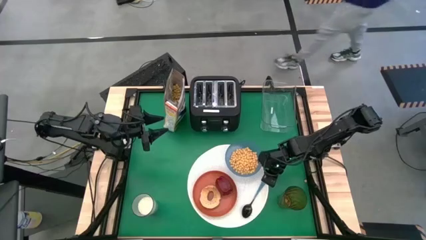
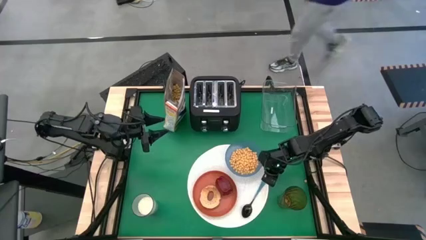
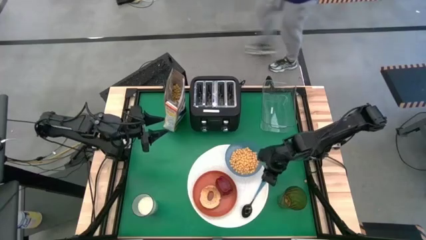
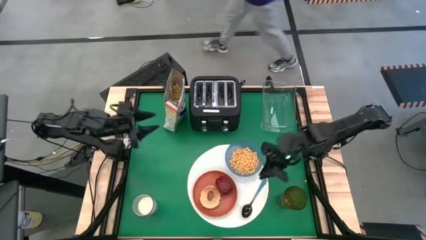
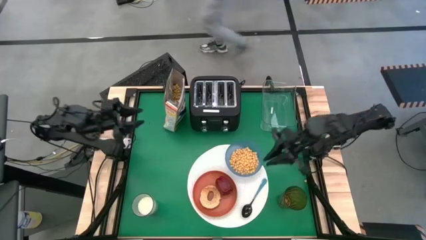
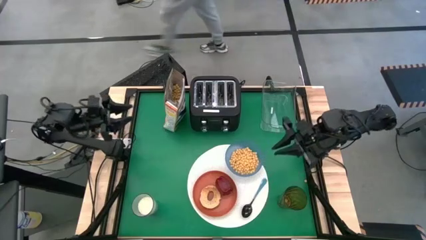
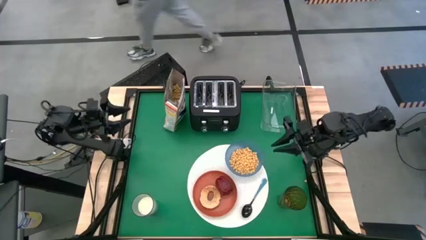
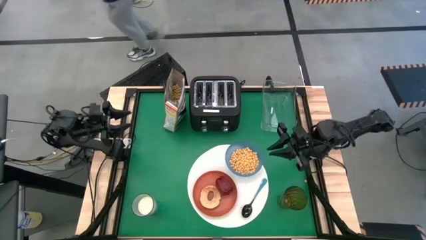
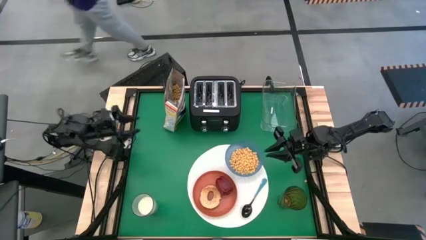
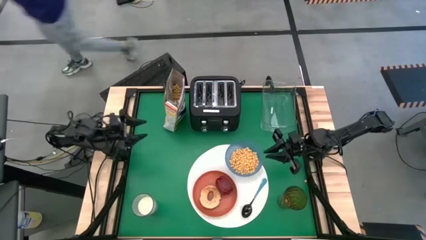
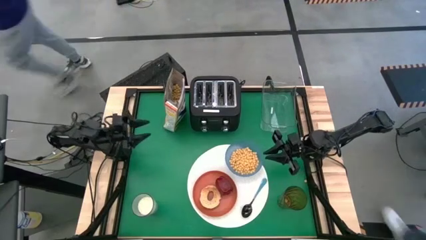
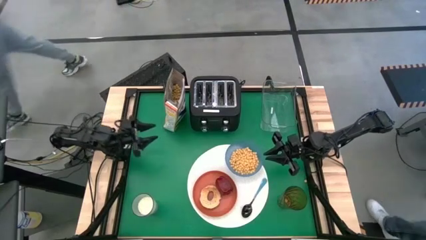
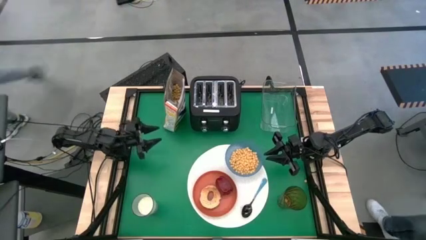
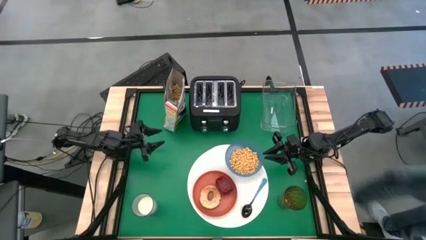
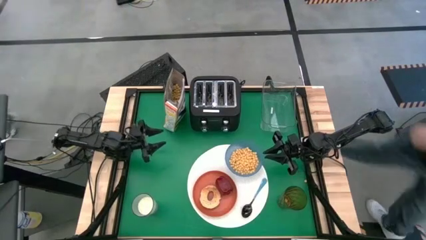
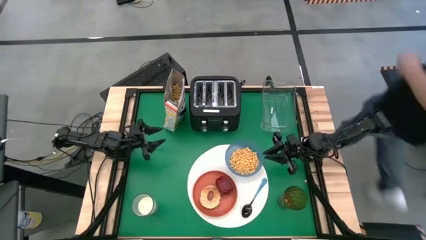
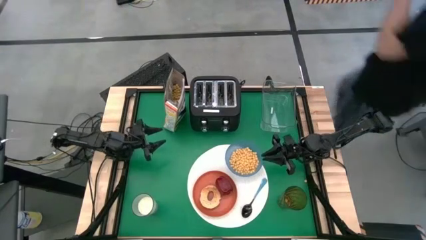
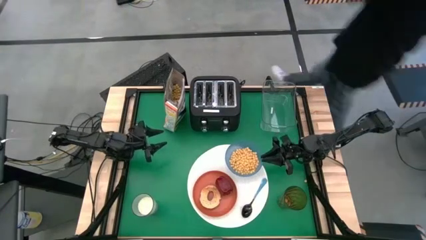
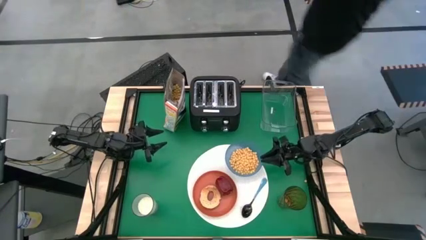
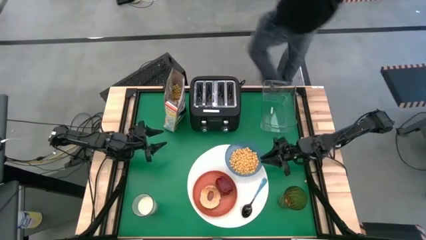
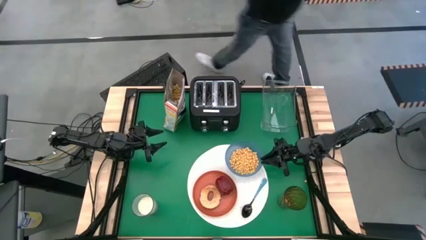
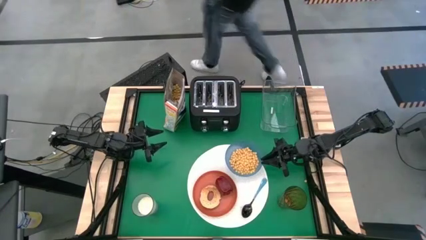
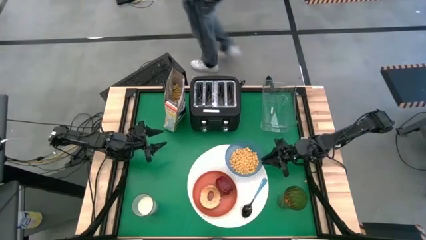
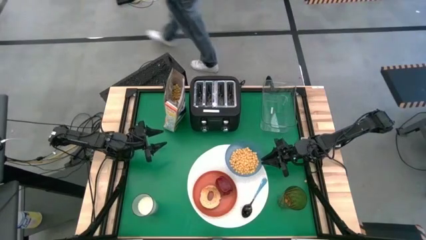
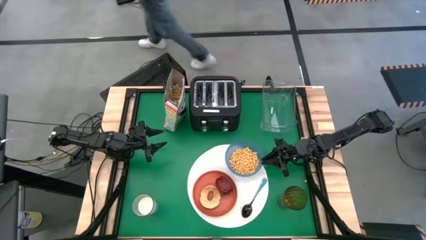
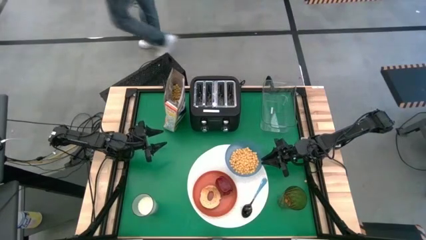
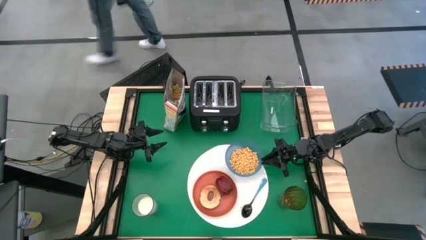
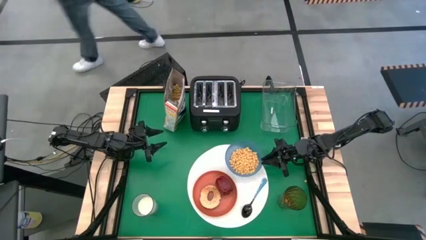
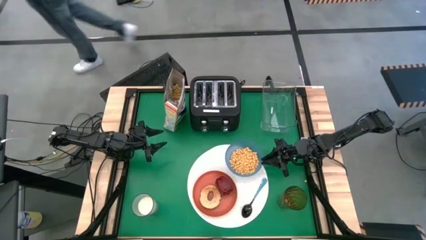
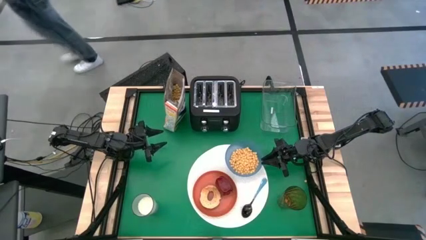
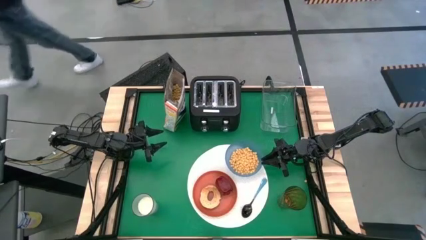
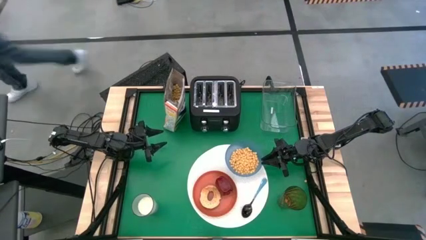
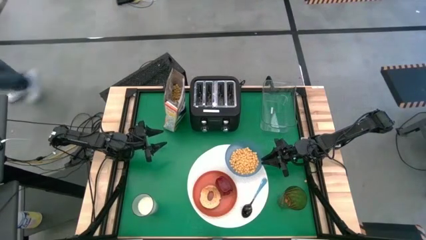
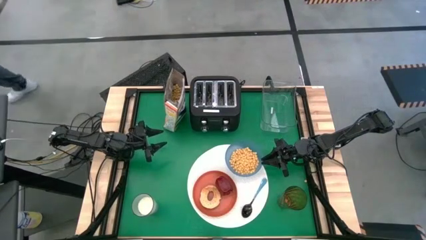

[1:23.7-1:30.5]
Task: Arrange a breakfast setting
Return to Home Position

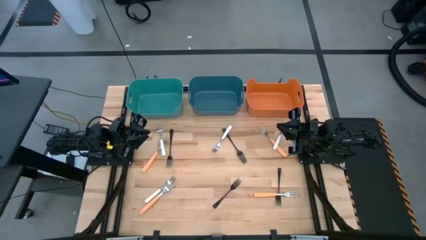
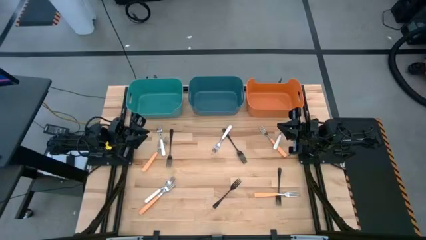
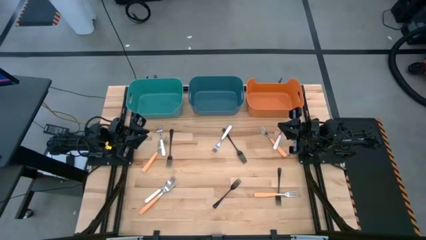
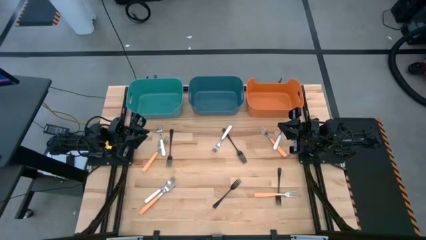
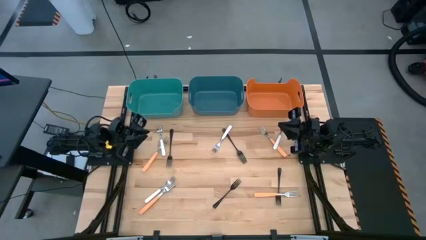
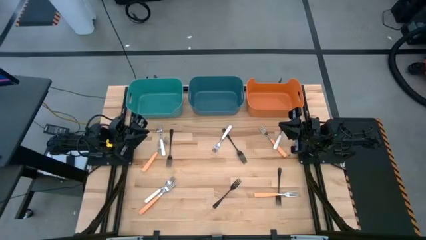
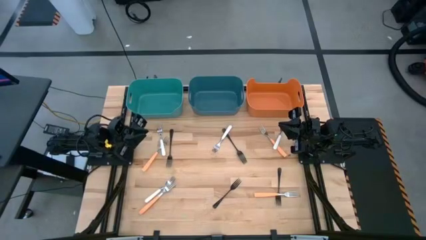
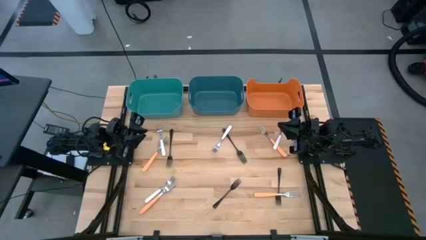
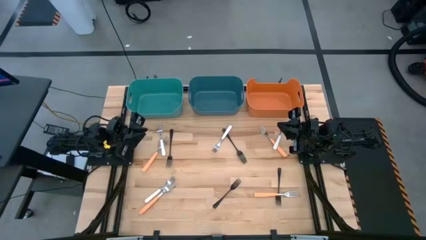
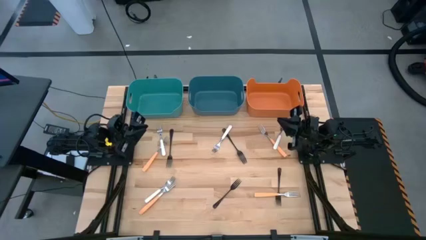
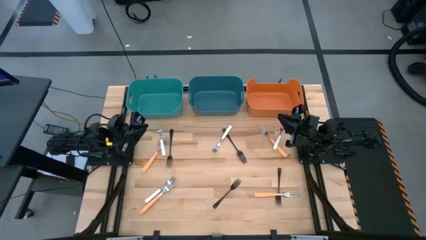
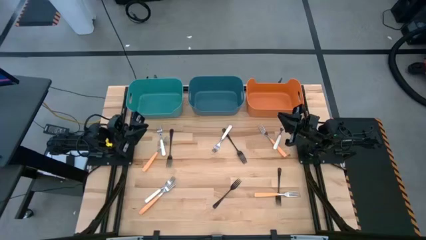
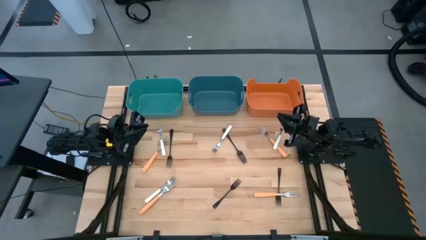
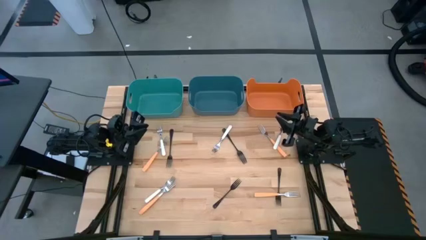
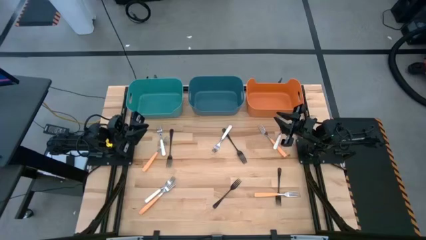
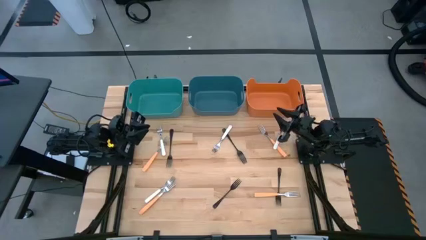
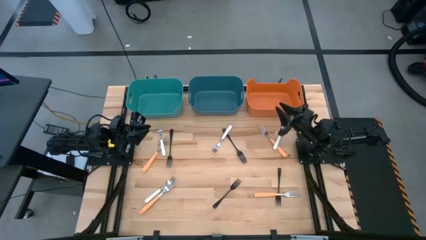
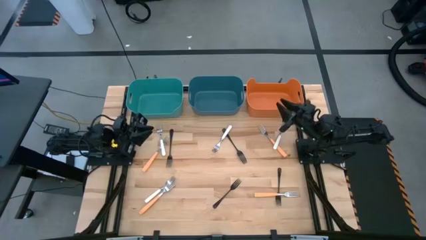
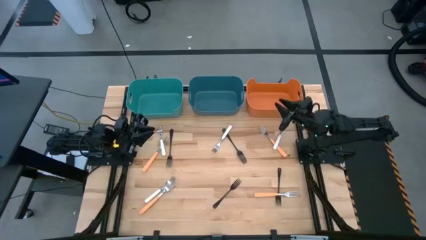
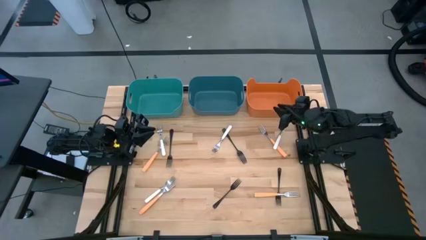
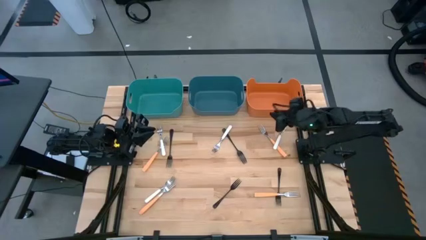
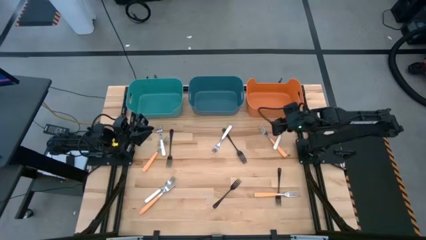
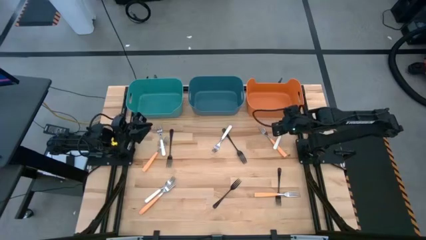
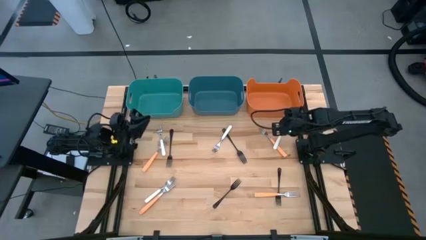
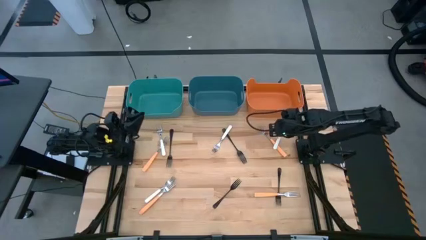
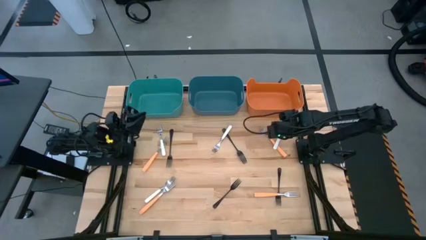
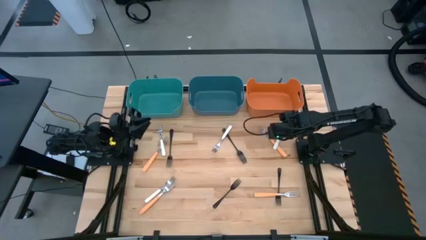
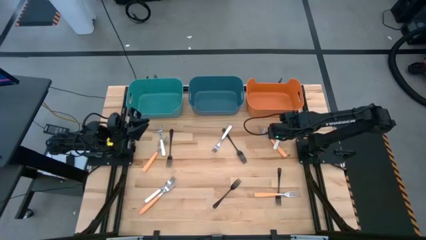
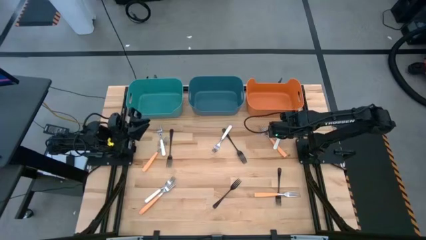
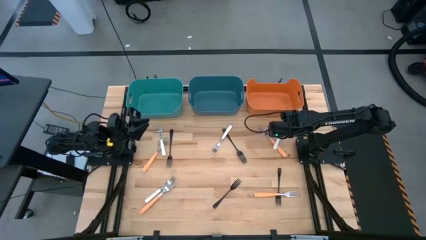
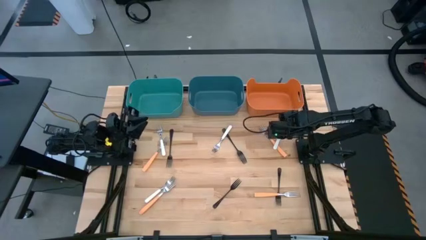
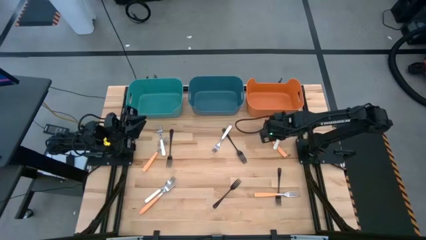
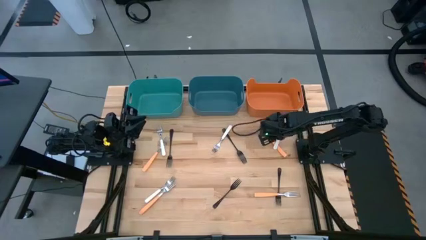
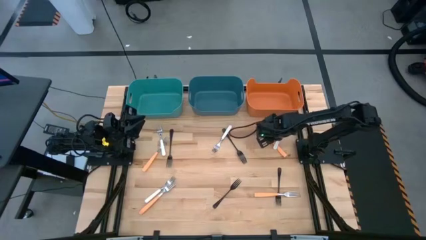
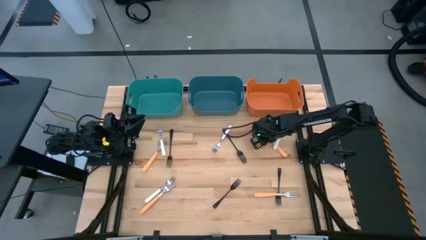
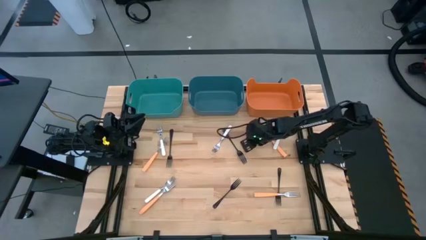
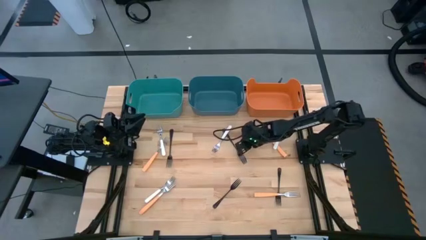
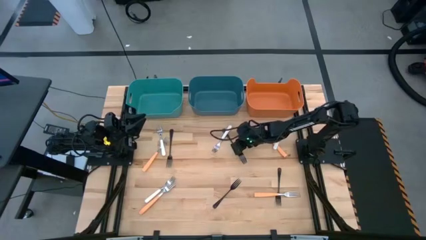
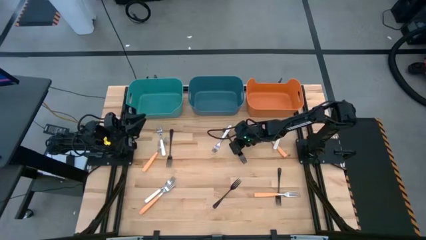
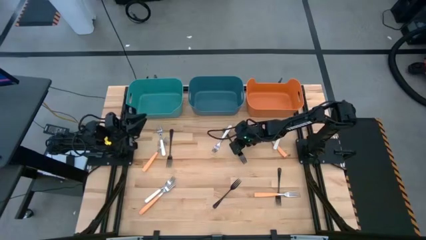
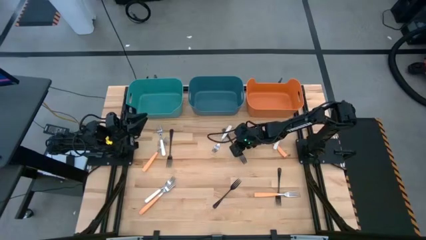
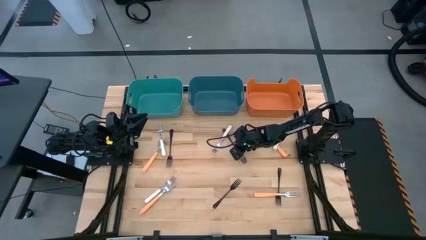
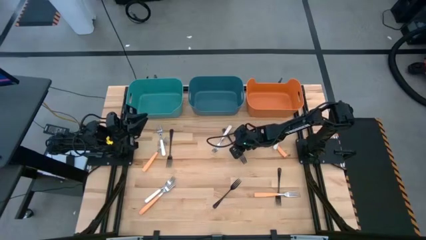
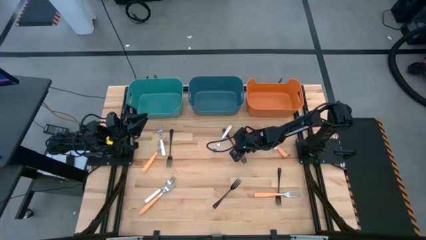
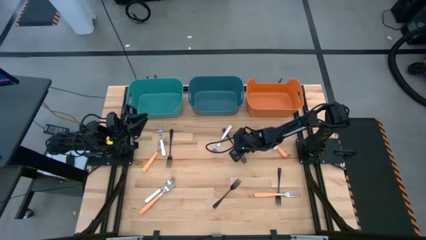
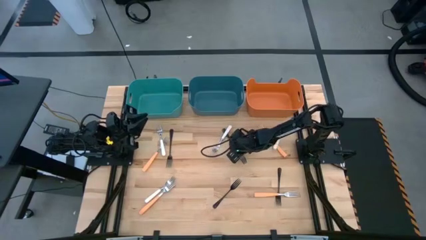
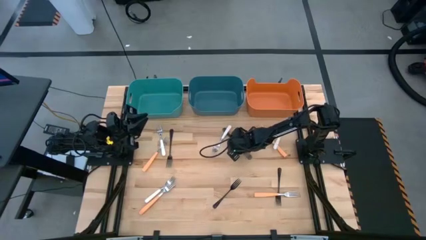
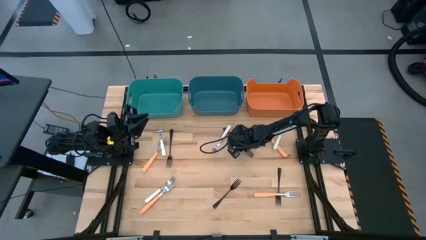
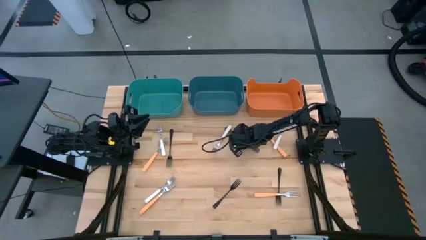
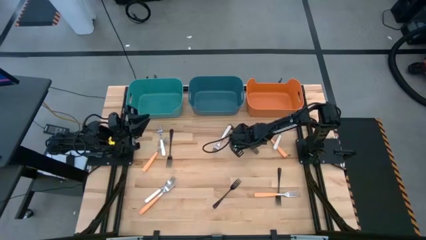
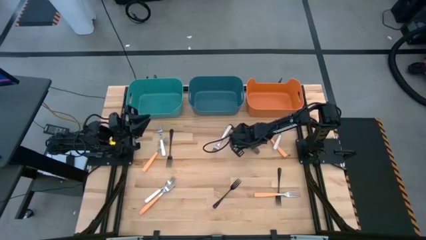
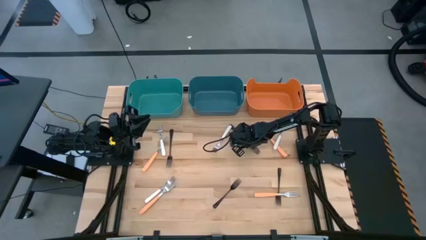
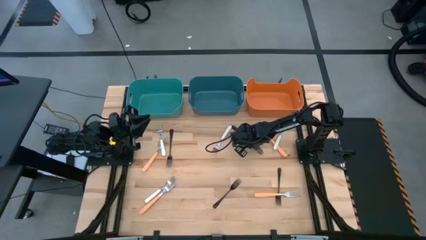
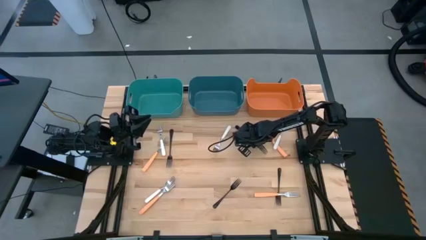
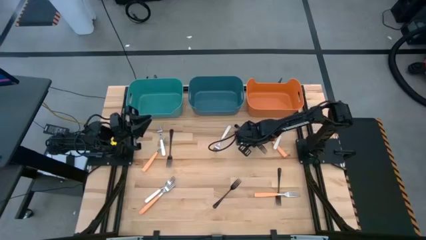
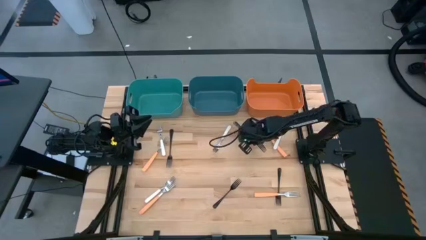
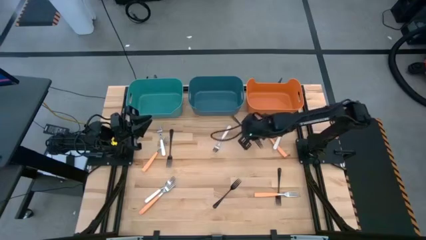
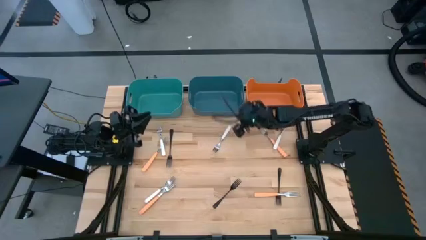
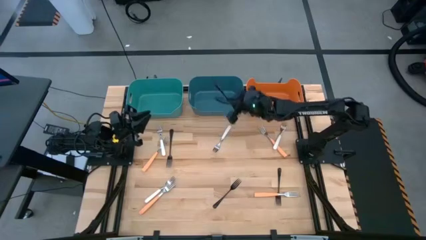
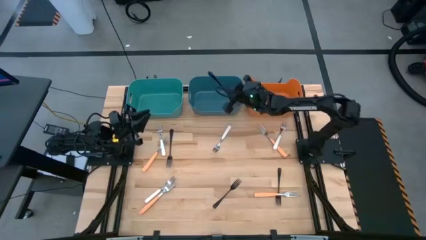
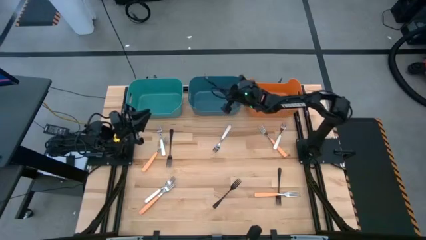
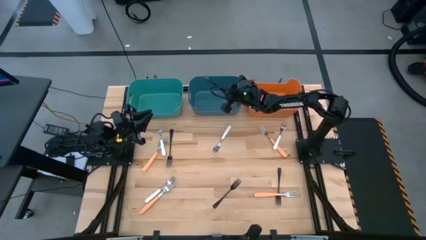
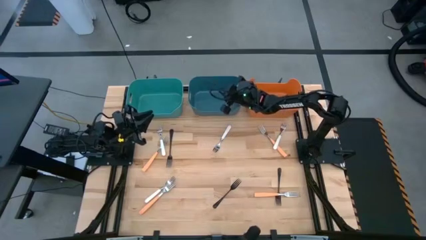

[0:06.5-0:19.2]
Task: Sort silverware by color (type)
Put the black fork into the blue bin
